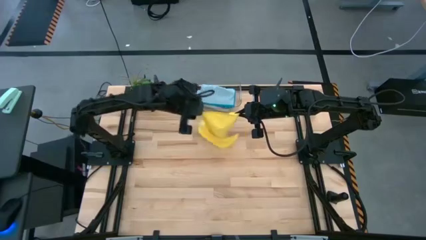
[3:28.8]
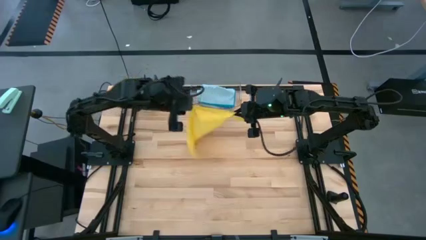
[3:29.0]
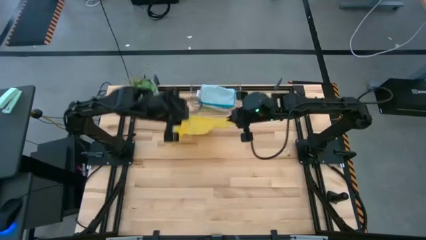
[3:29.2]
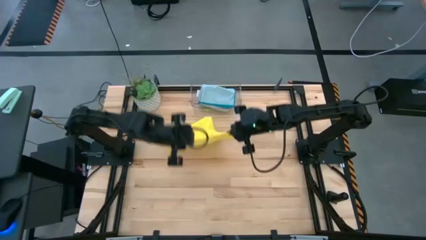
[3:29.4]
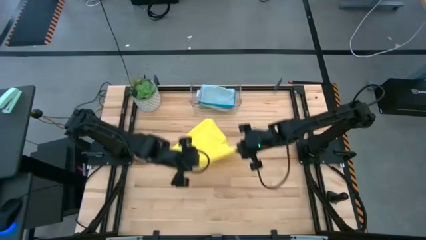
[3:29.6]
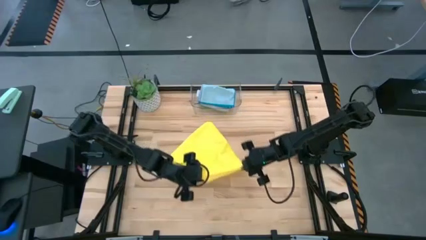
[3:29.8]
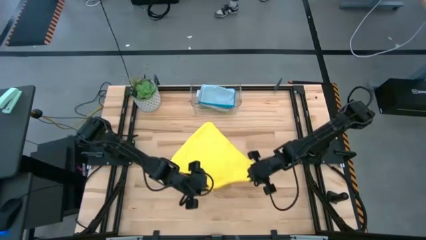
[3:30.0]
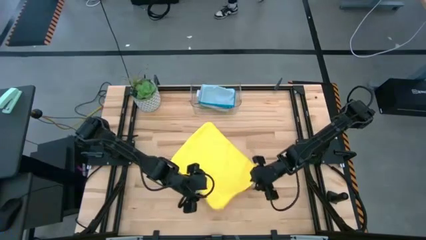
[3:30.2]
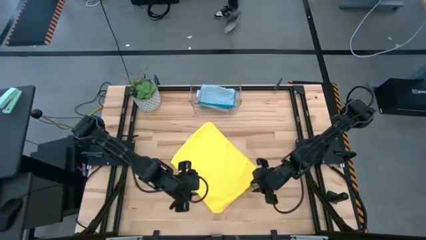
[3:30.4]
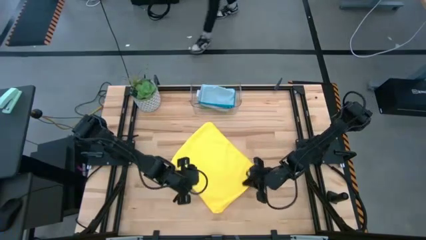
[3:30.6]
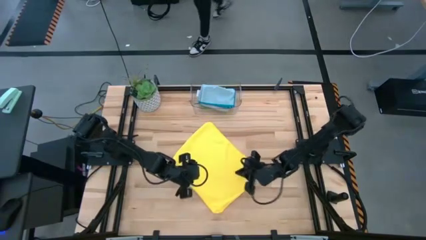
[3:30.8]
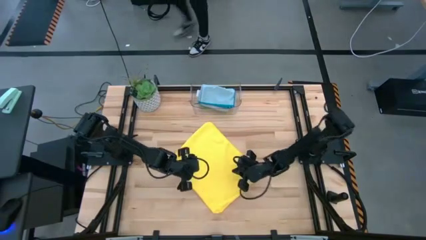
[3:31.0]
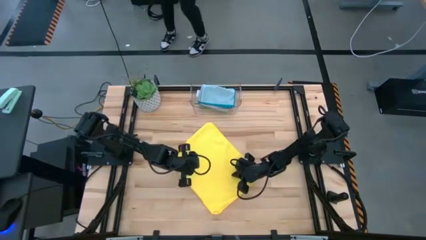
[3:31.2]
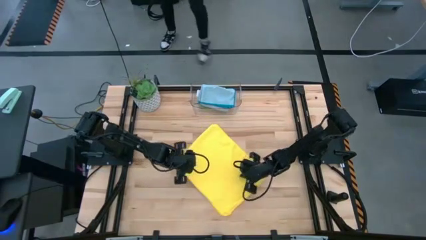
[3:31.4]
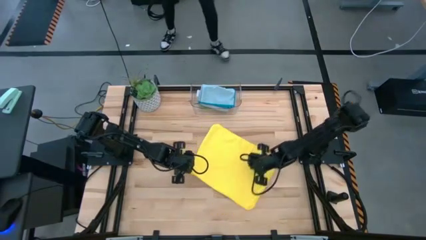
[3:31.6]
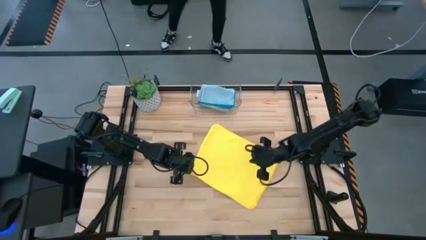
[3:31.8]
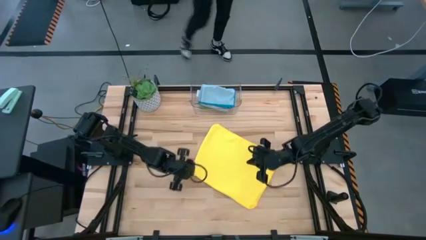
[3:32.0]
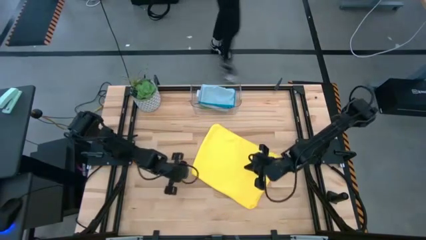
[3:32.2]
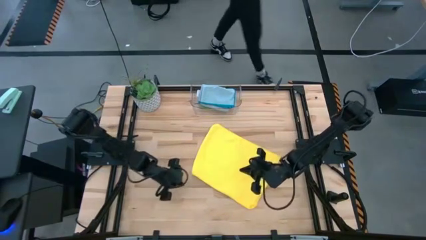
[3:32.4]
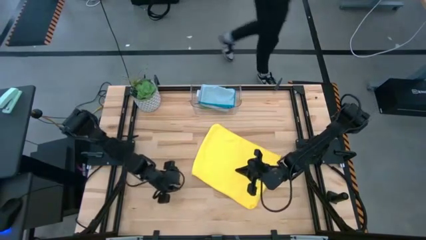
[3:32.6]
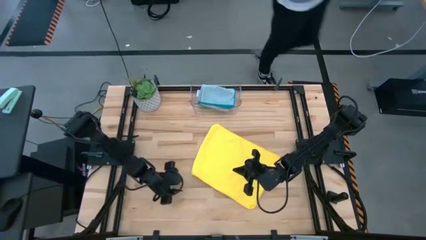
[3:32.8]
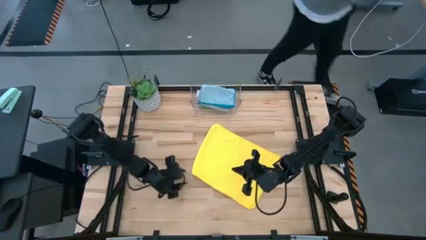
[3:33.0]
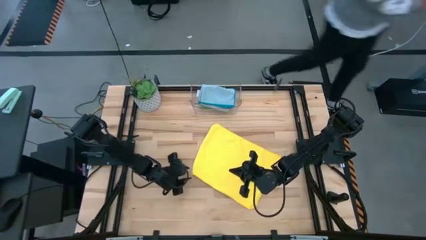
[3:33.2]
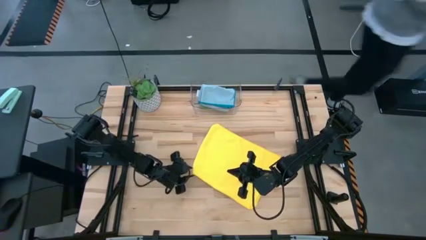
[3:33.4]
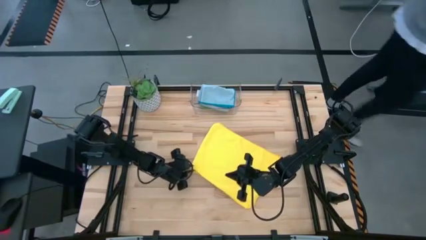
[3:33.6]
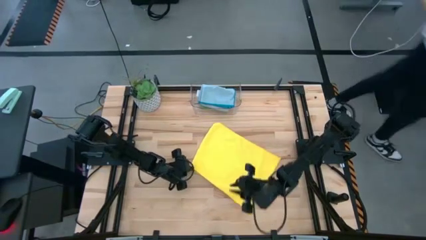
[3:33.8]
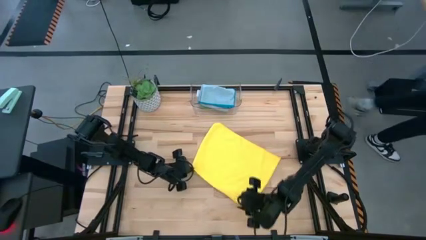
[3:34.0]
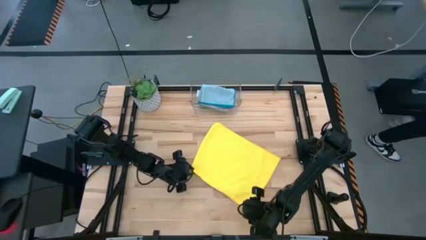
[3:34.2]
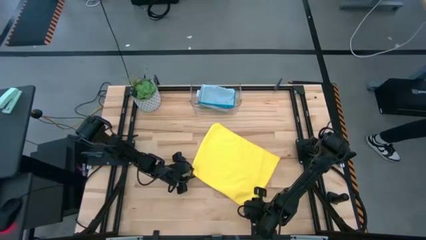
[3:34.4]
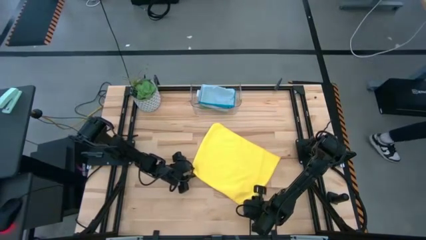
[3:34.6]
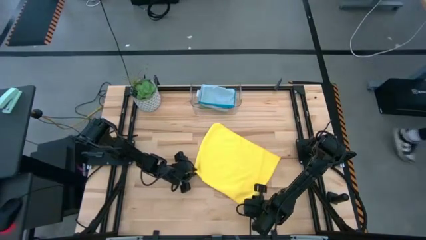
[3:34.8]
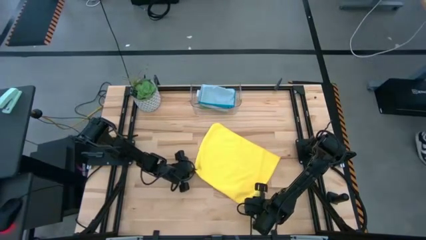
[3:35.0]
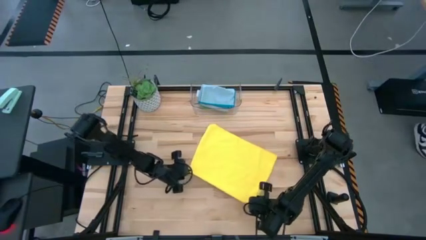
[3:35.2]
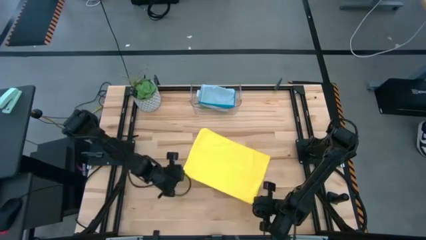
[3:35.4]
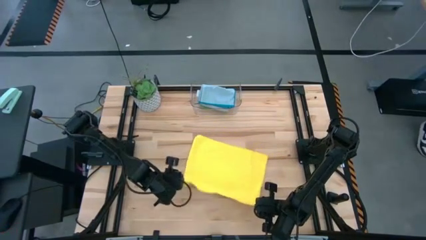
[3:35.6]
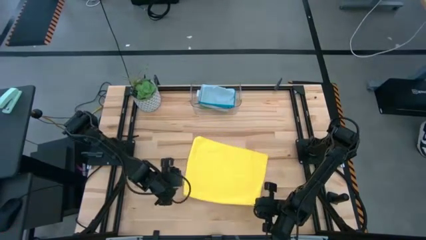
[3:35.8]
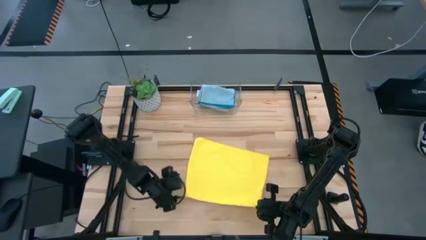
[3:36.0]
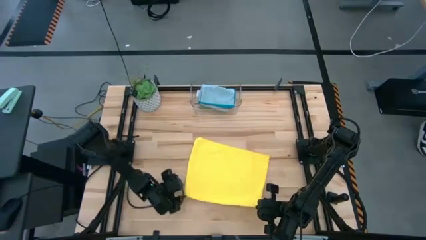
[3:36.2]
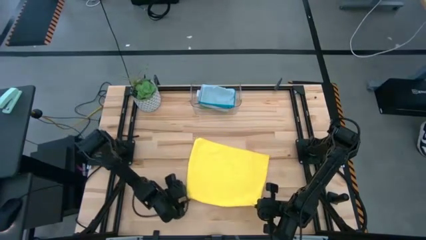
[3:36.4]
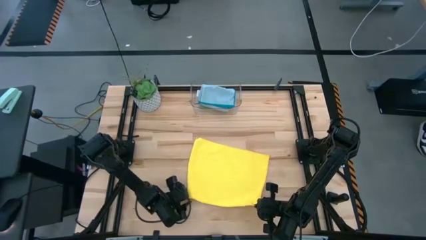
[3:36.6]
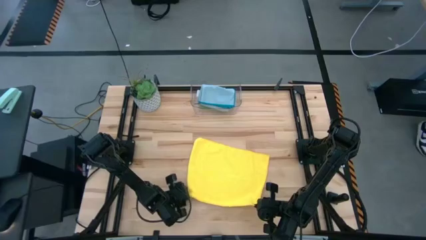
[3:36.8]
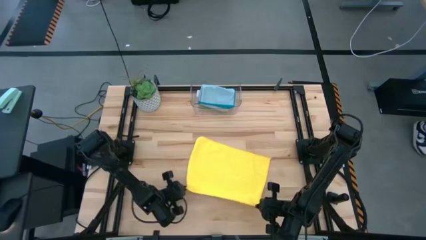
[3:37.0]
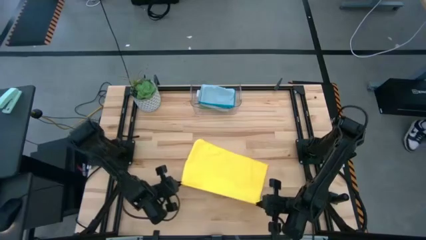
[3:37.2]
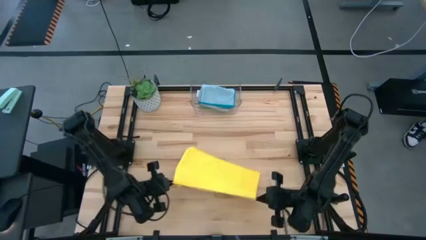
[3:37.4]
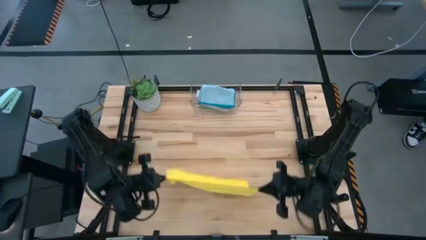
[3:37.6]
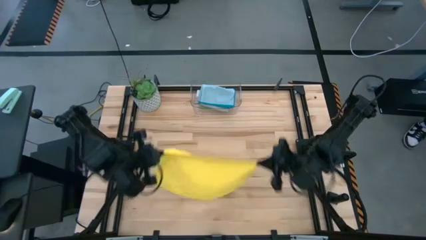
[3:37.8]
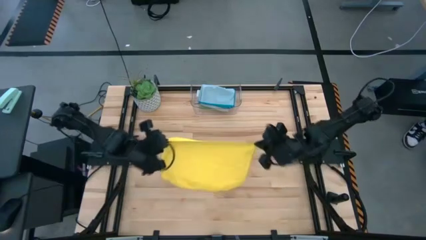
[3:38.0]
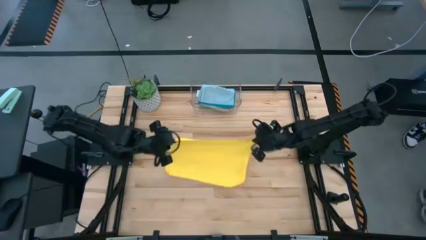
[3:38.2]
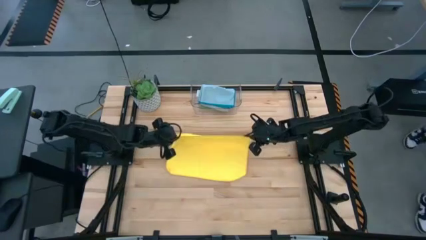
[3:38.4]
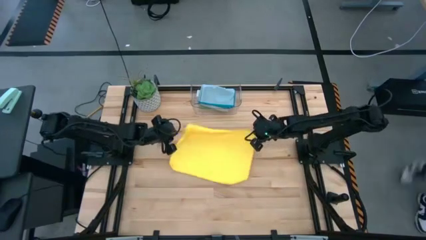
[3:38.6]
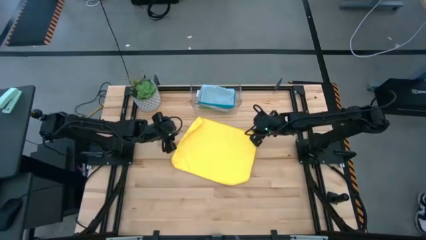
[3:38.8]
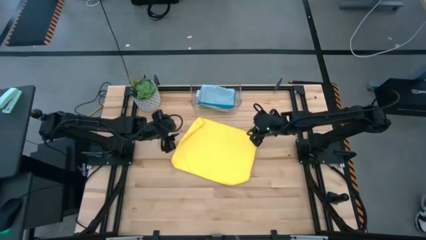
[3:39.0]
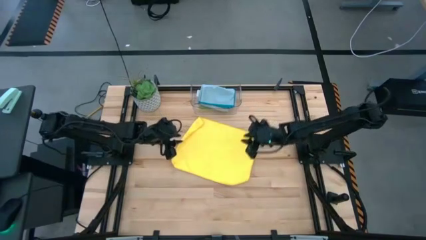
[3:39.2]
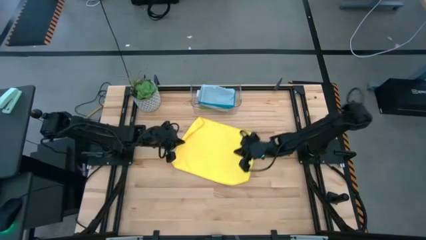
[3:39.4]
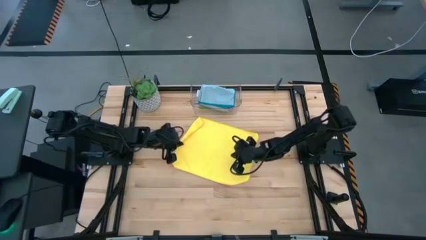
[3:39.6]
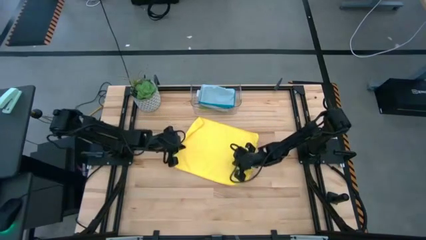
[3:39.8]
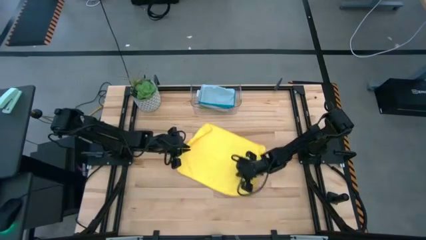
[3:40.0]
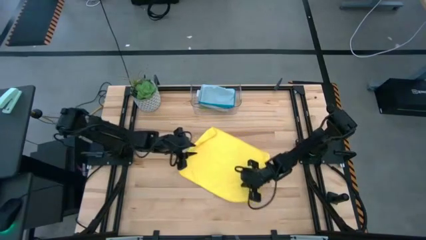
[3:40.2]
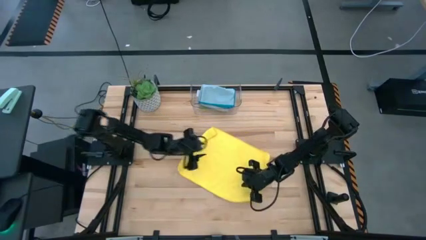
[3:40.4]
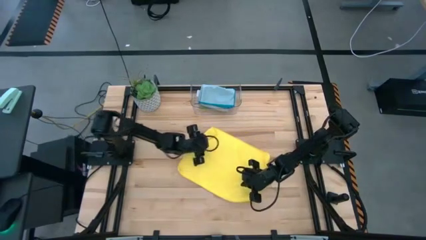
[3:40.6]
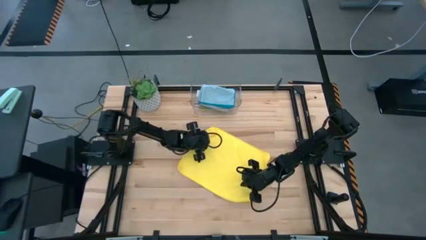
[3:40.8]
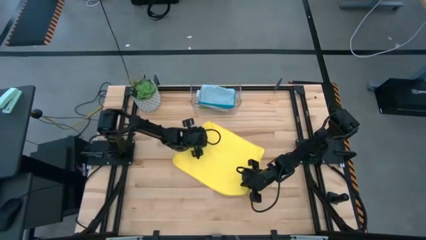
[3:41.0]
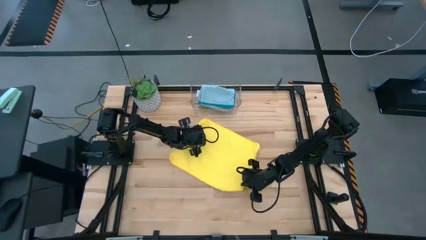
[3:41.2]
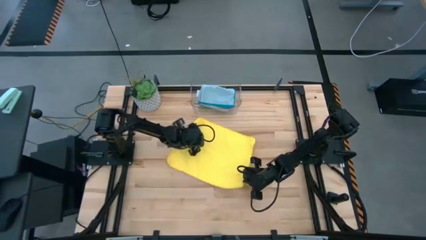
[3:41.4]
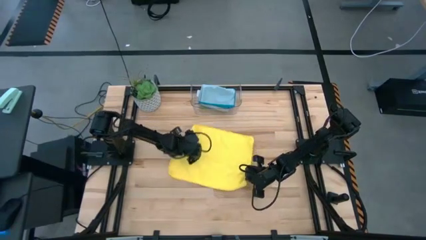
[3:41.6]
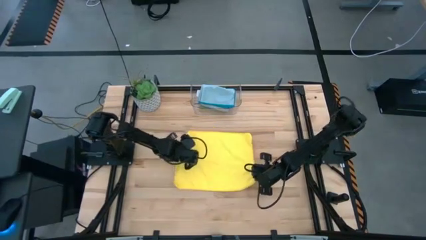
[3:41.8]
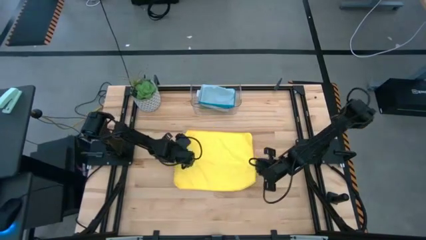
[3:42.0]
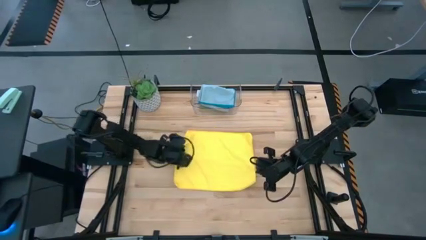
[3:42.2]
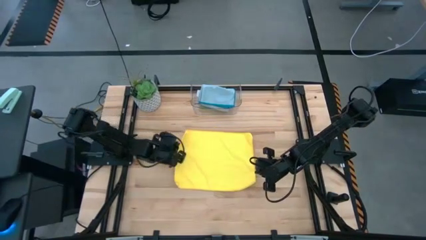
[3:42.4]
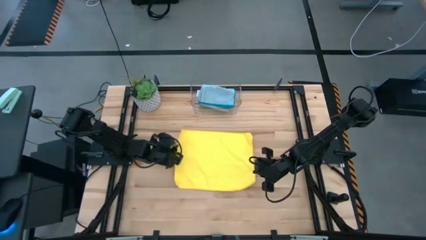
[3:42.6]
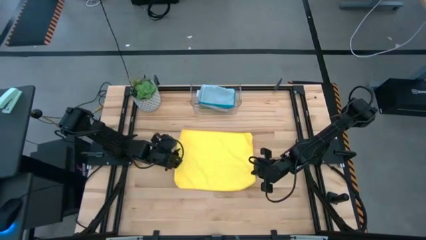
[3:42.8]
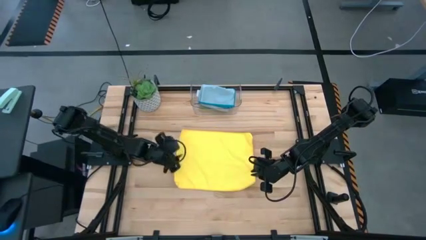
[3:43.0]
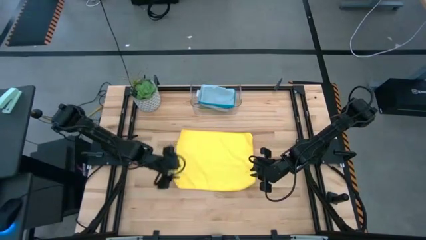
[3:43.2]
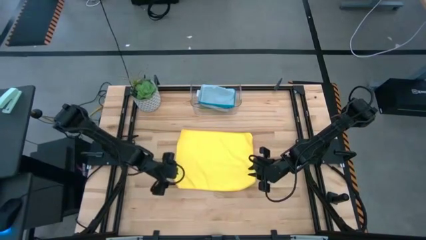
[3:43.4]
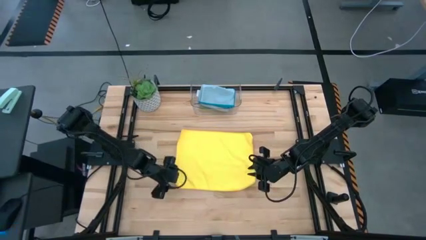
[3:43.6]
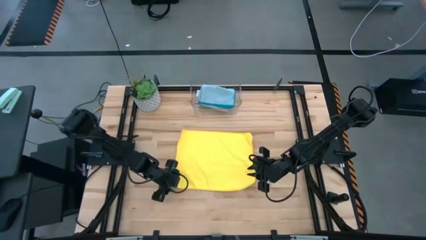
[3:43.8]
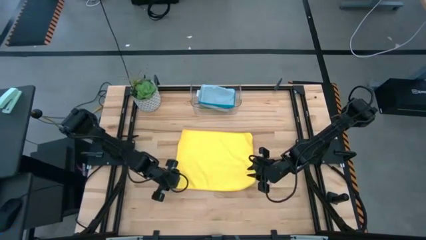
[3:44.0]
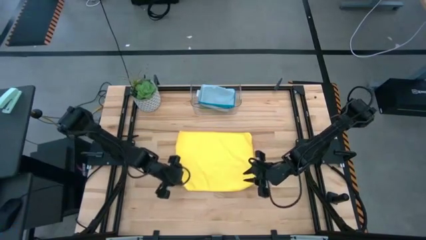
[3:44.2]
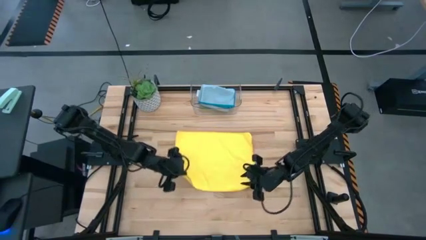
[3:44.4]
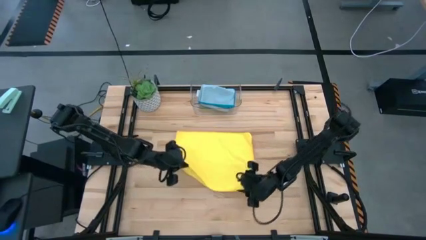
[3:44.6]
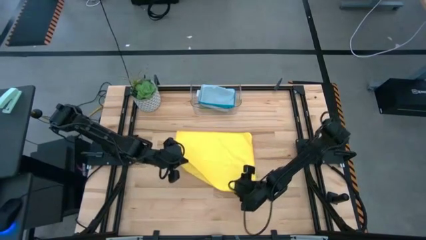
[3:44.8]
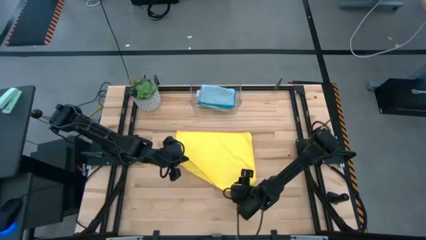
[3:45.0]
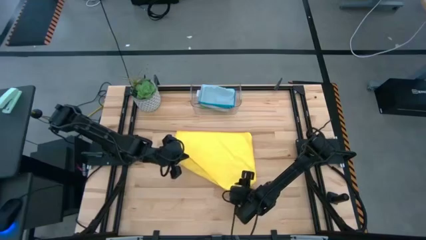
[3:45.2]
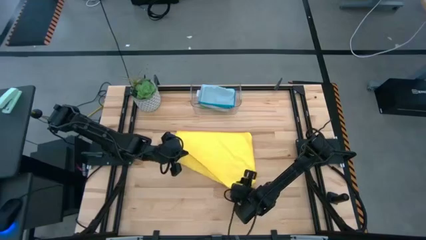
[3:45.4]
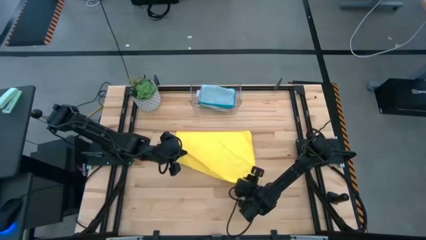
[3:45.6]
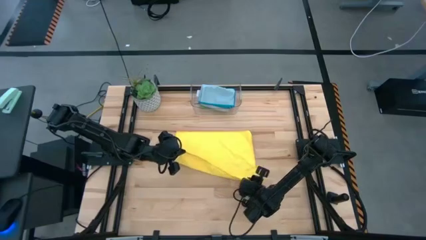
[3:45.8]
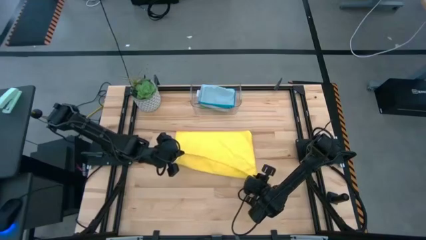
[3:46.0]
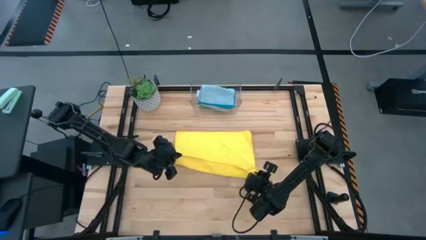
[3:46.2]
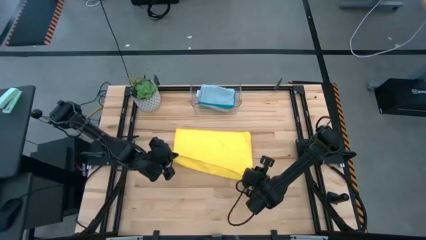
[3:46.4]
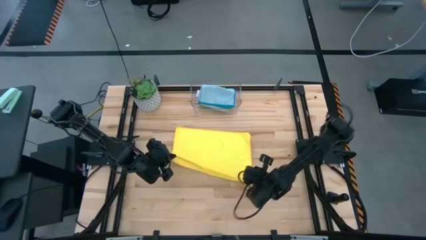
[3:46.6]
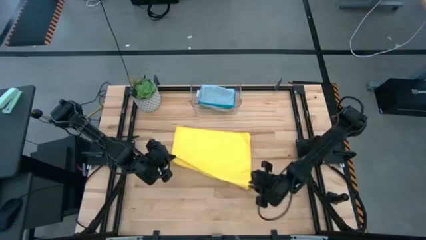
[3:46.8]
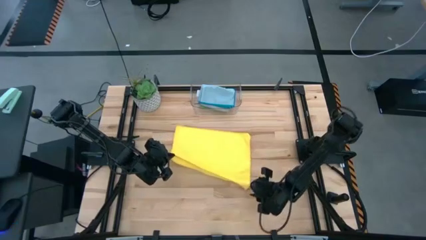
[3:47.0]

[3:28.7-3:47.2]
Task: Fold microfiber towels
Fold the yellow microfiber cloth
